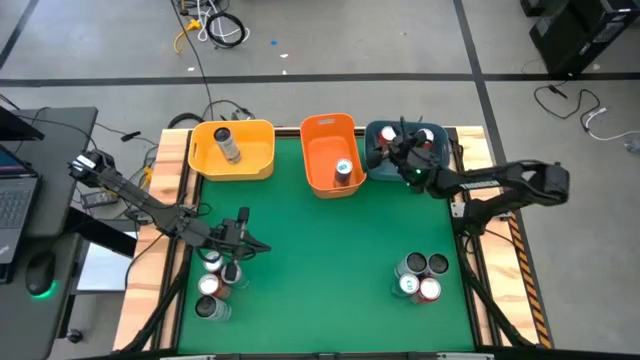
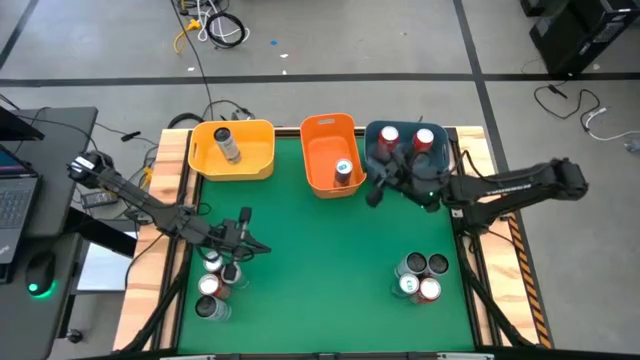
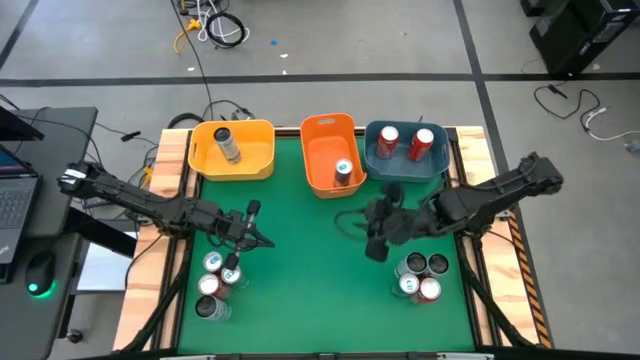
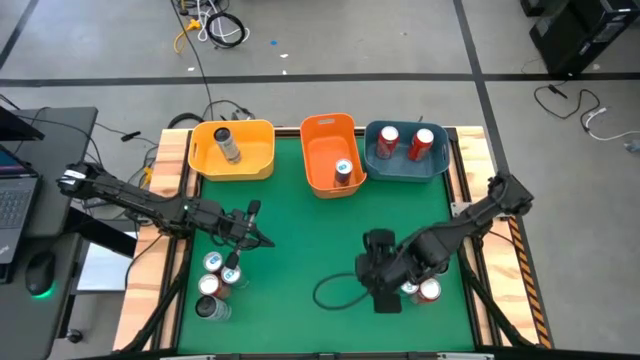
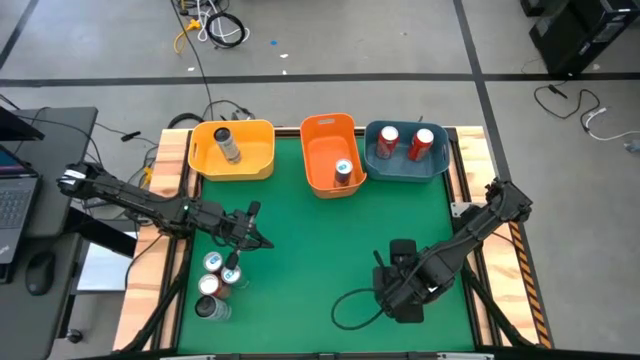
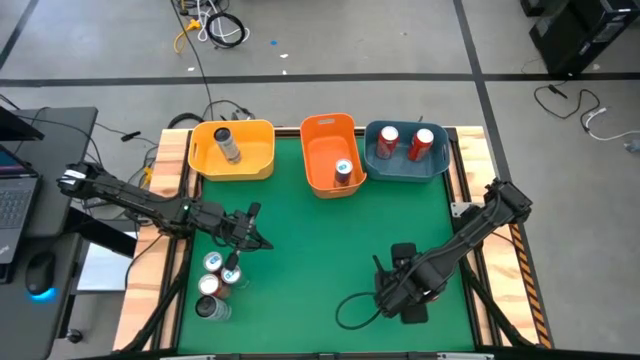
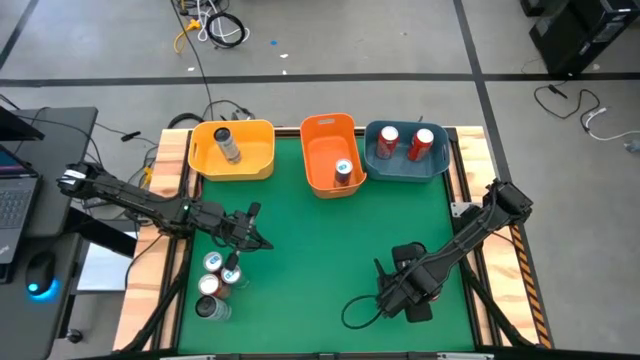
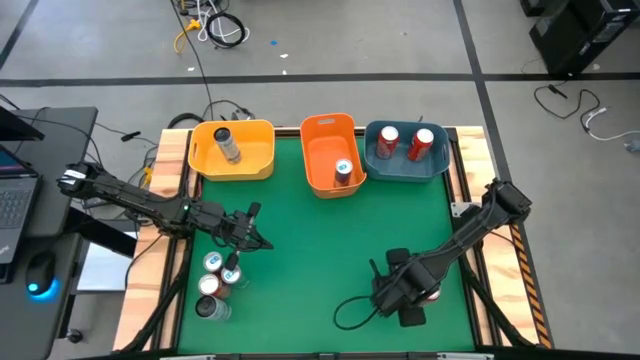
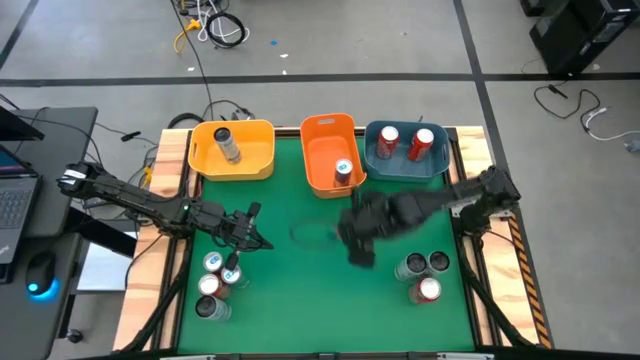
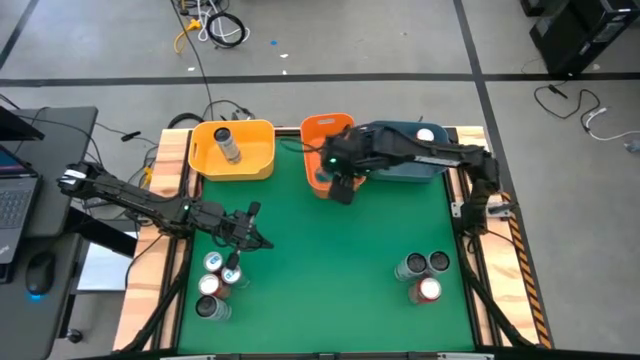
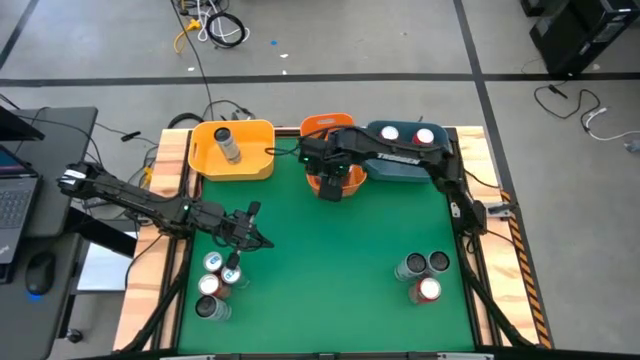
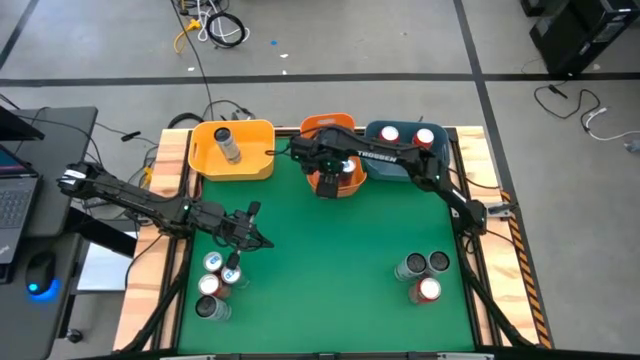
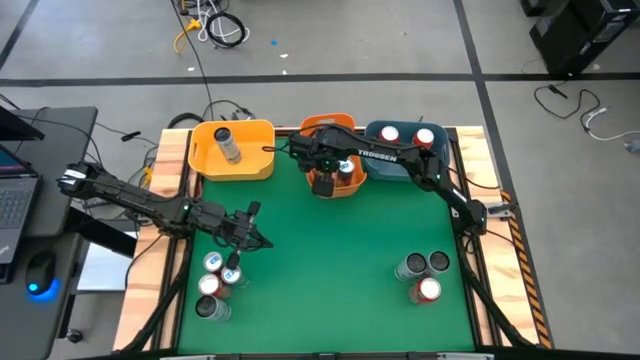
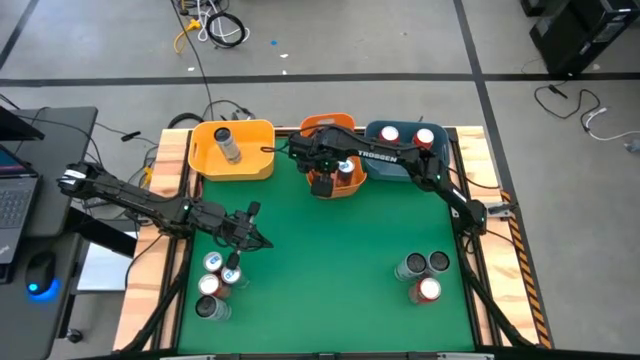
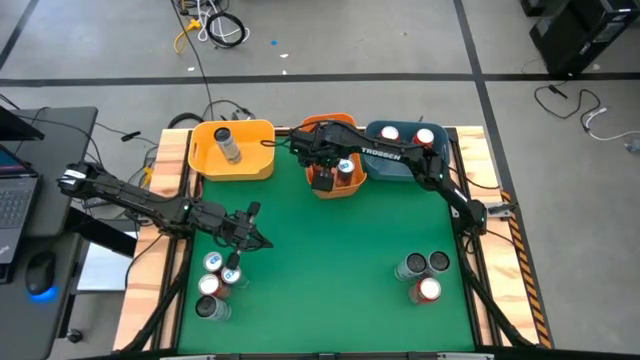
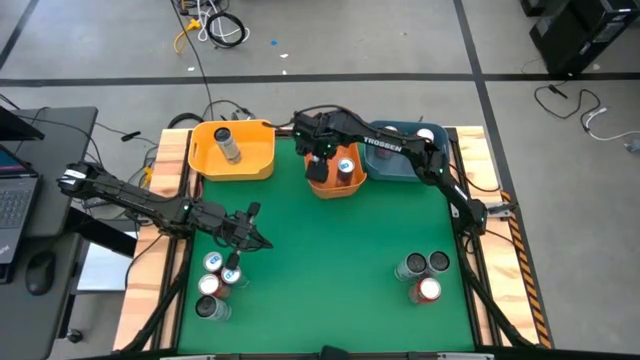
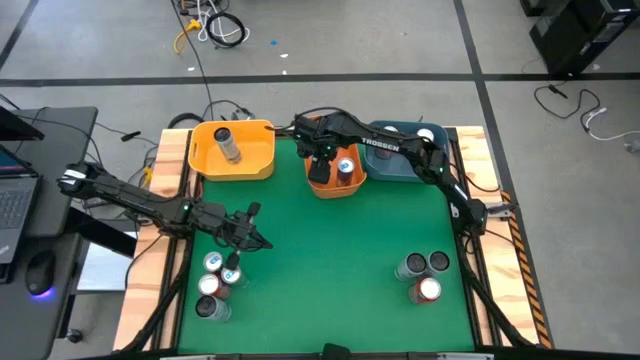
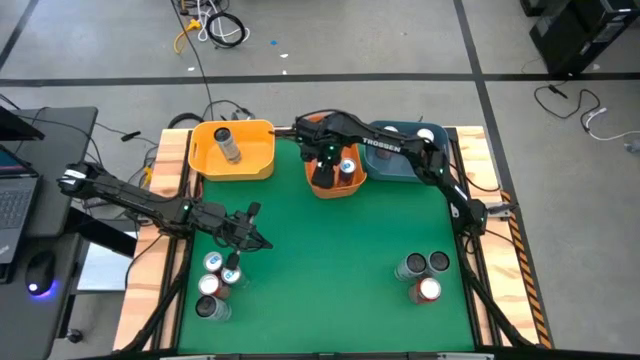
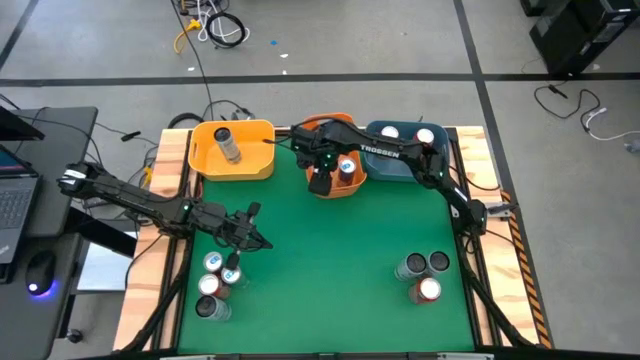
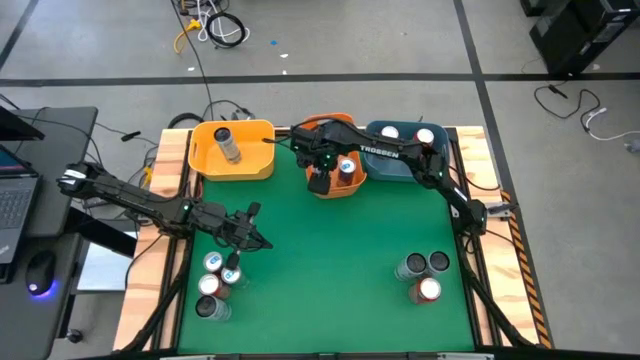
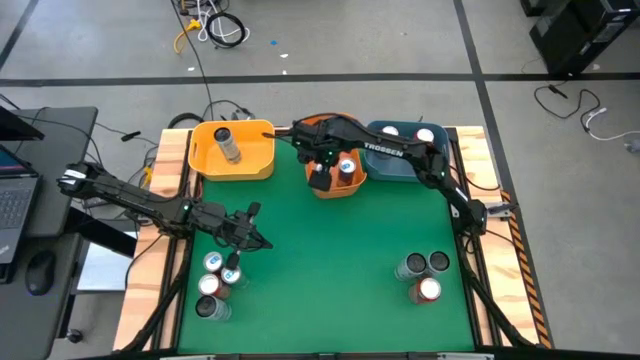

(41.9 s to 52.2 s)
Task: Sort soda cans
Put the blue soda can into the orange bin

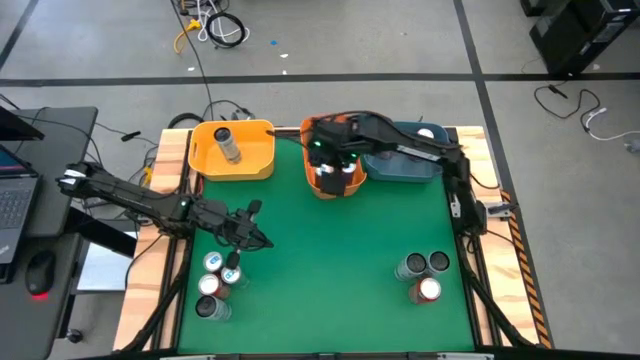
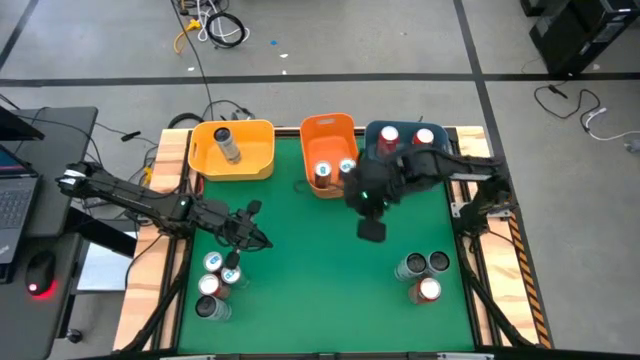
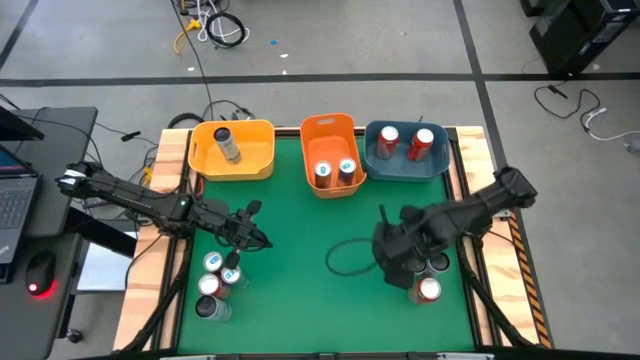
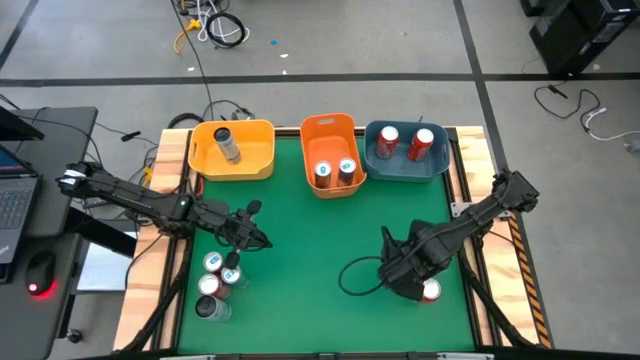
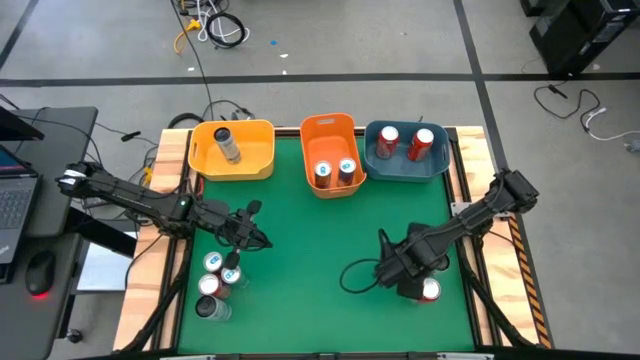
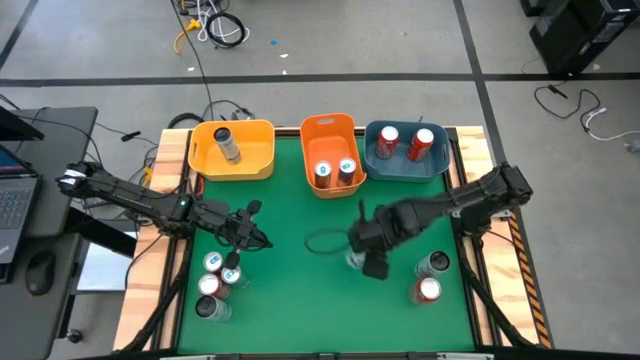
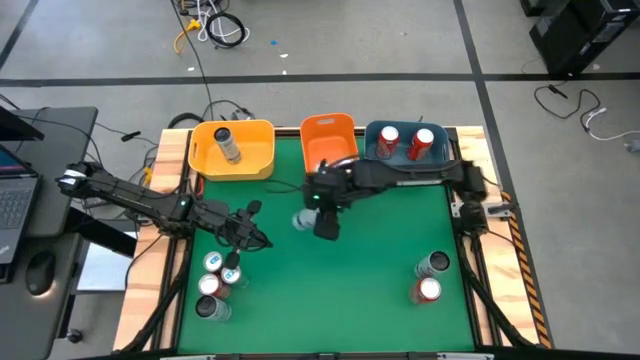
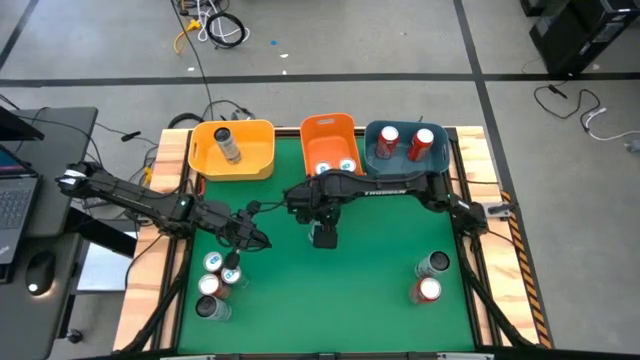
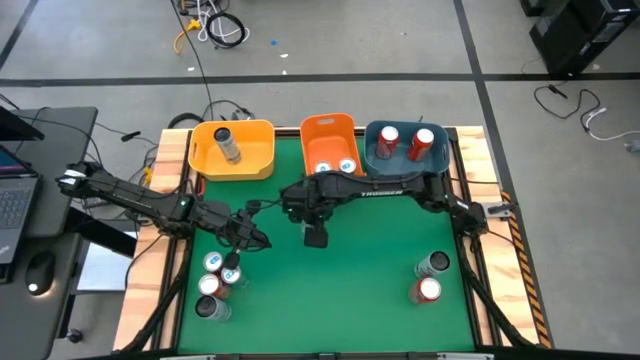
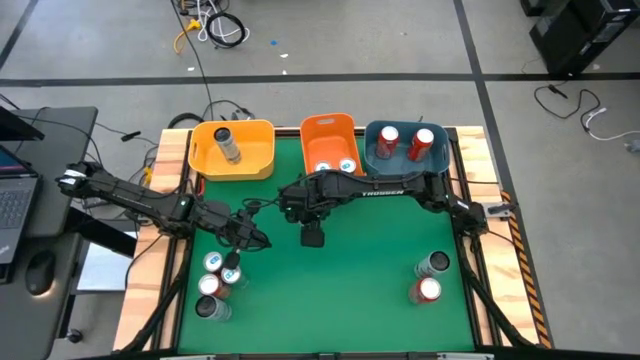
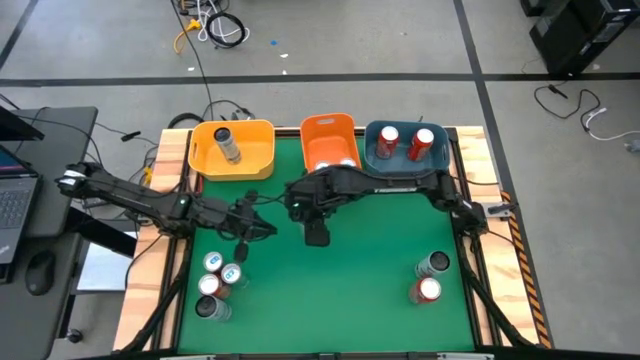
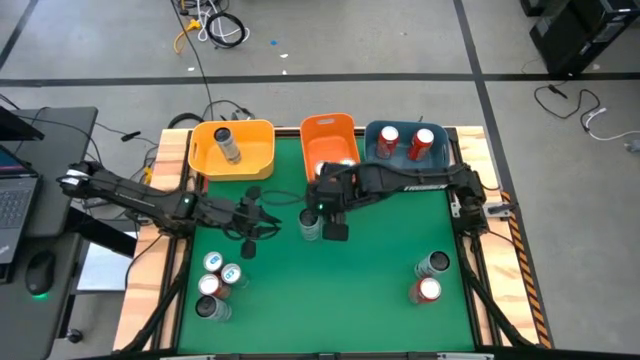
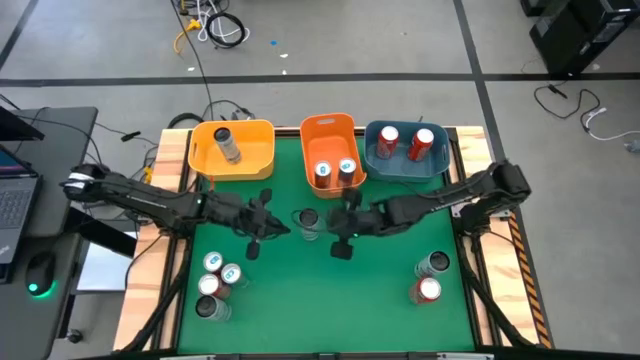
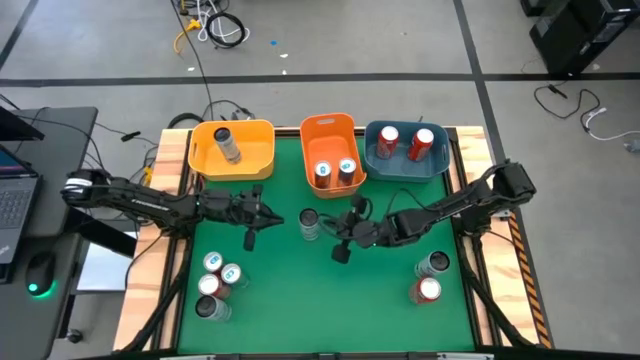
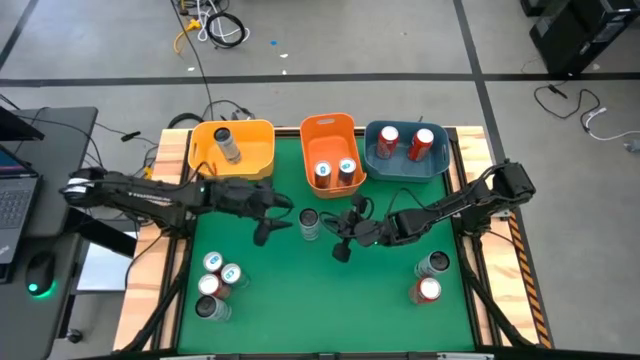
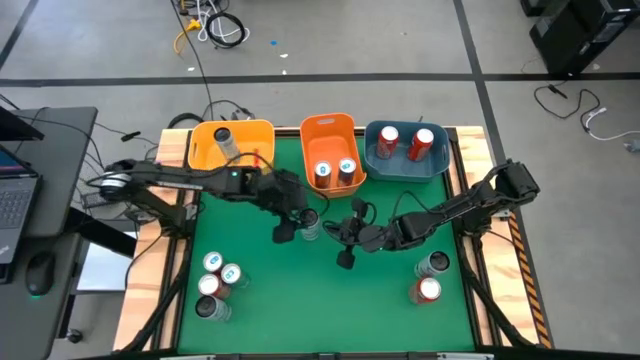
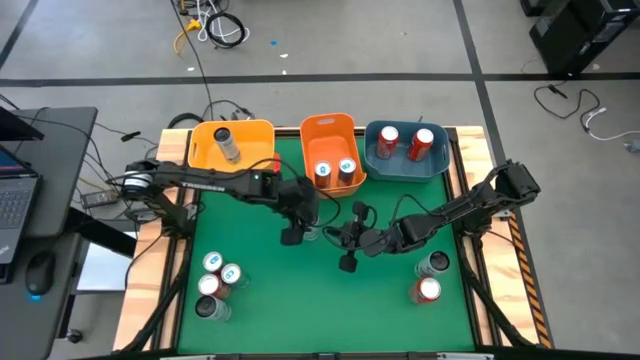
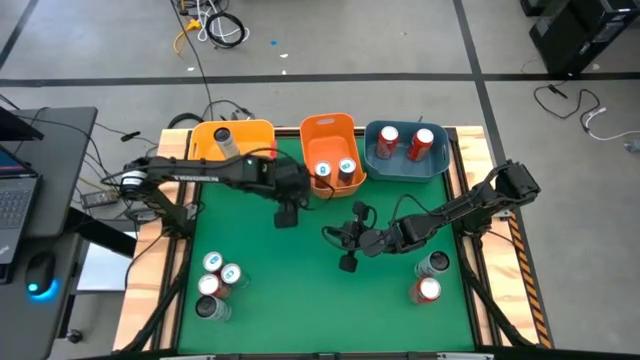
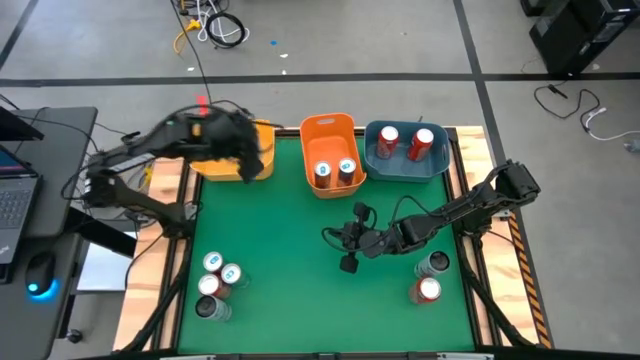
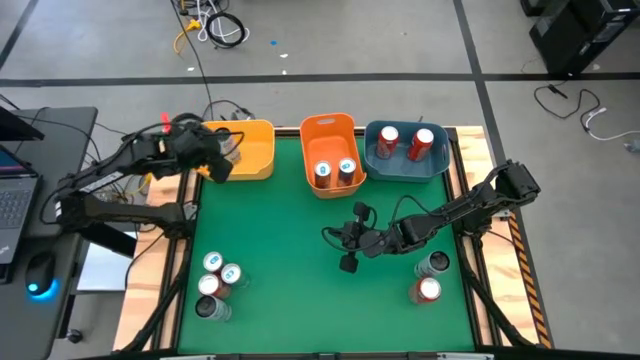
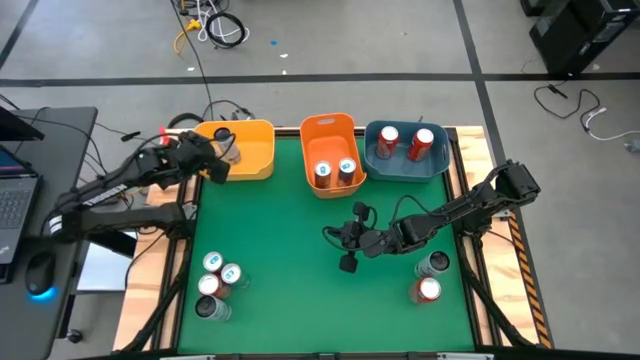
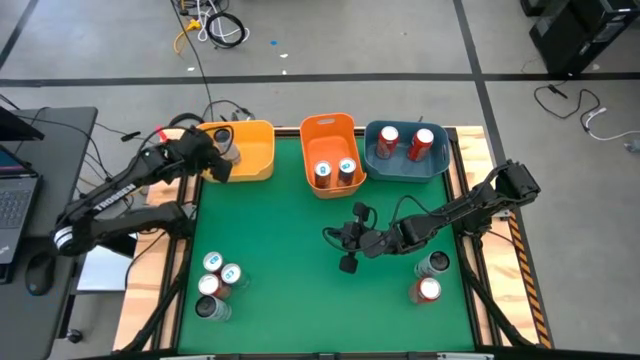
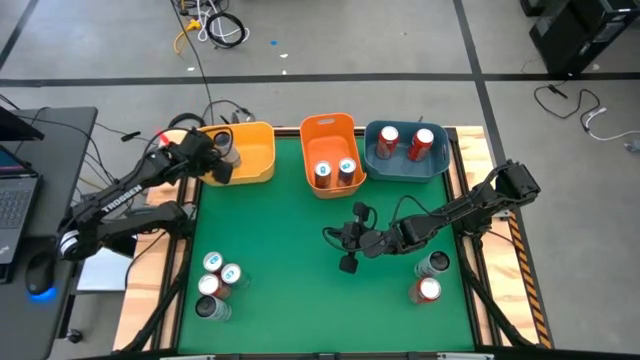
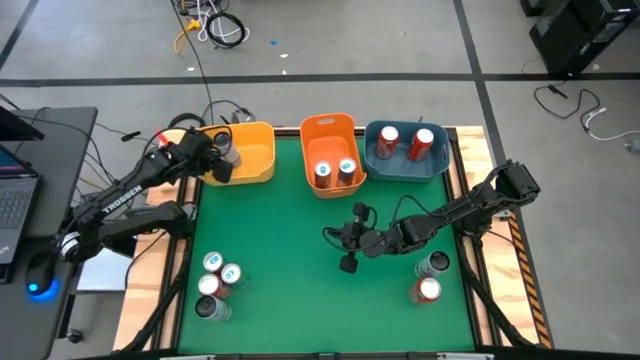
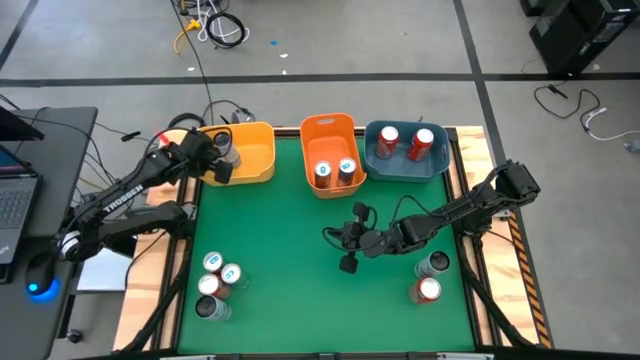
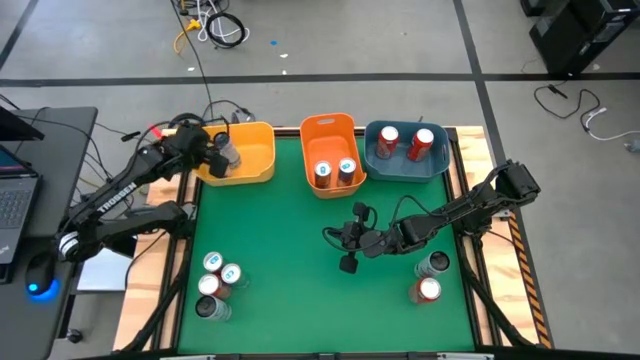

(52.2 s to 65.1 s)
Put the white blue soda can into the yellow bin
